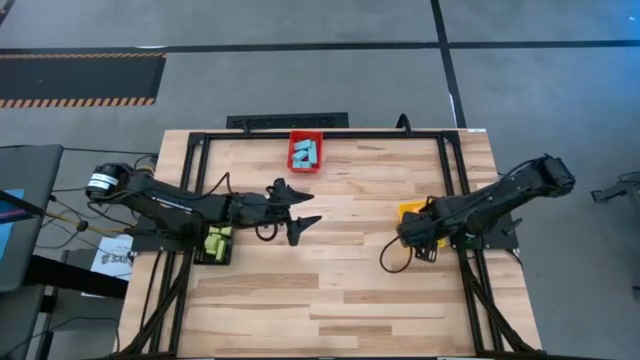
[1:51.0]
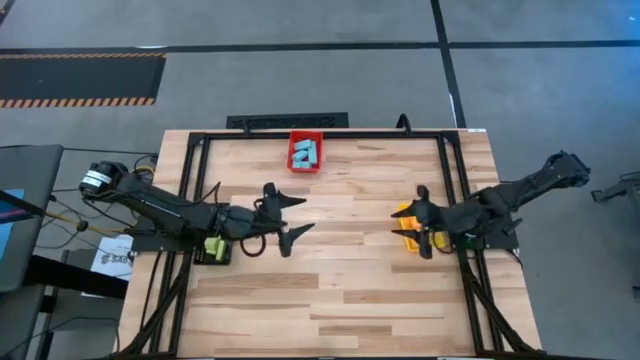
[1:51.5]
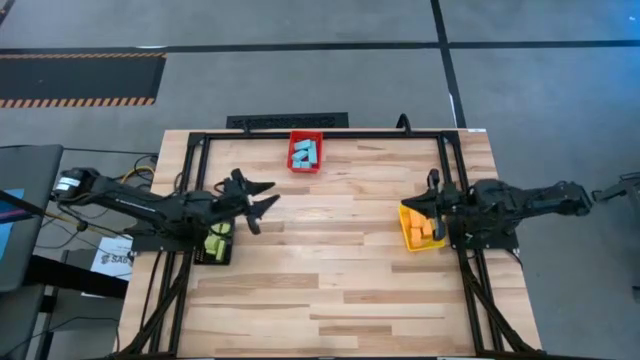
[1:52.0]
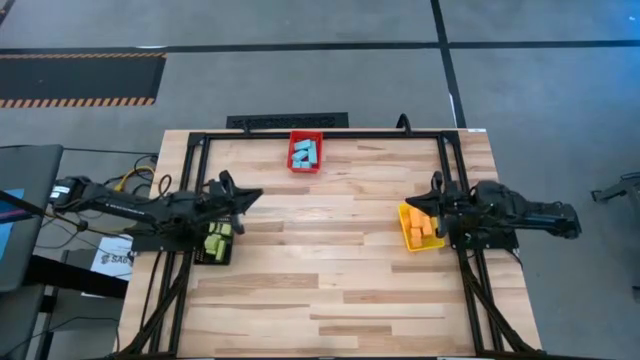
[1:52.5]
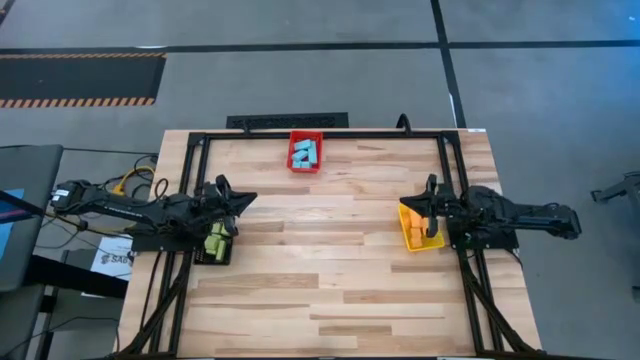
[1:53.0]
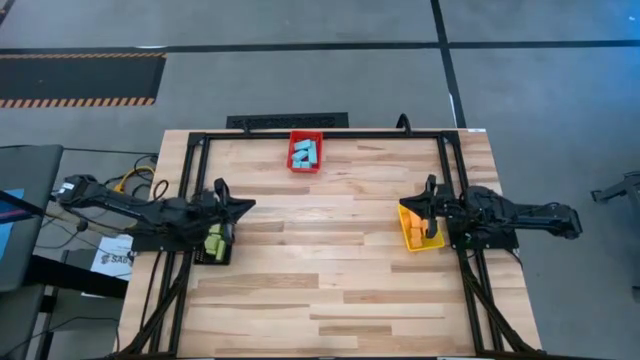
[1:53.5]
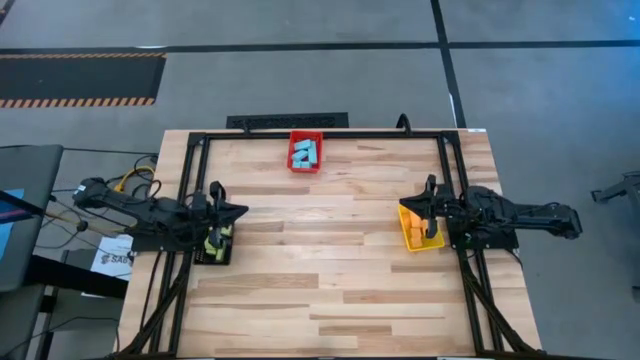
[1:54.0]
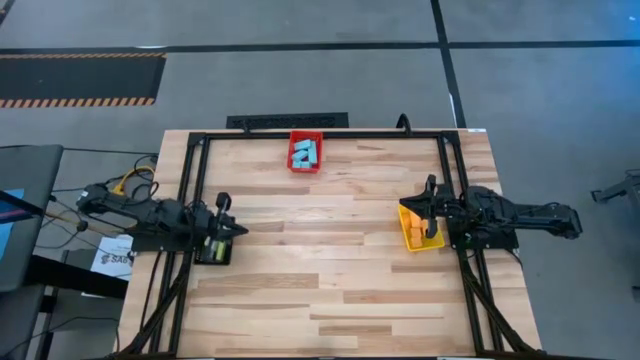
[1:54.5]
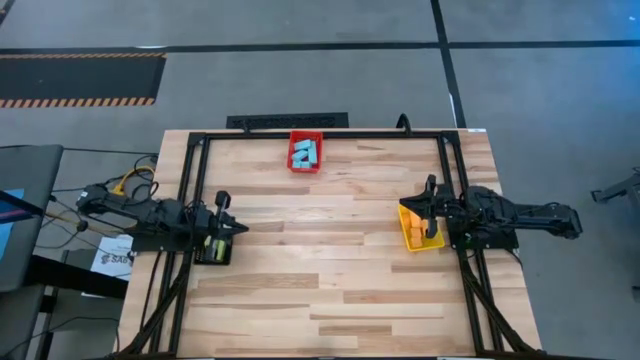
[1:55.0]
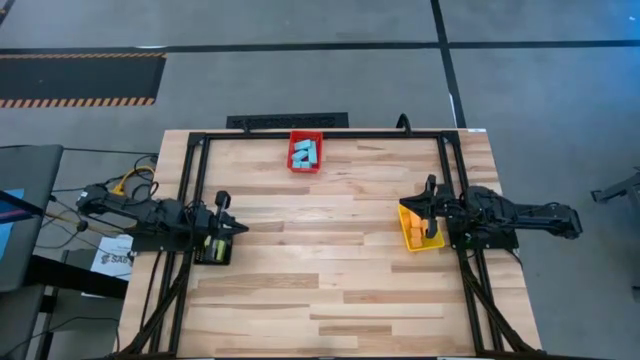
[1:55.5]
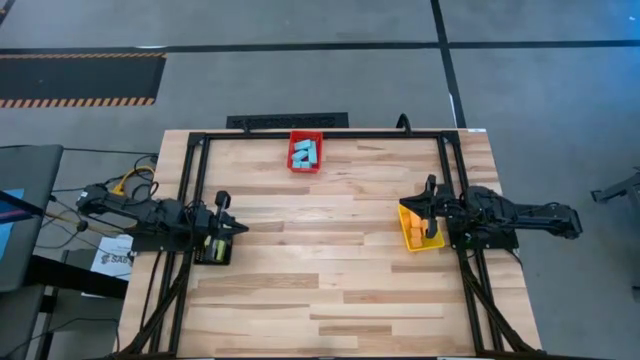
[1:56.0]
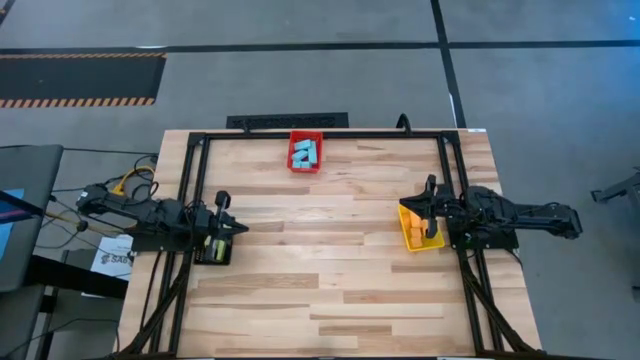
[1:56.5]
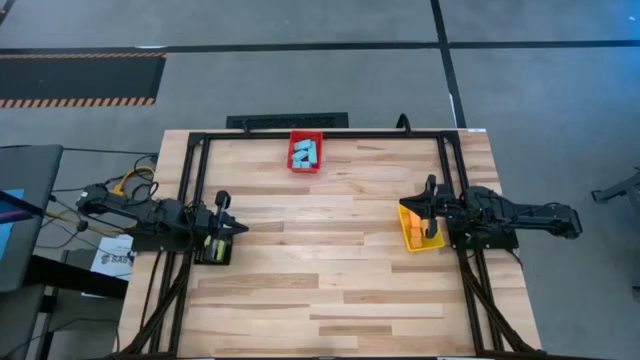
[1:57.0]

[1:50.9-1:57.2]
Task: Sort & place blocks by color
Return to Home Position

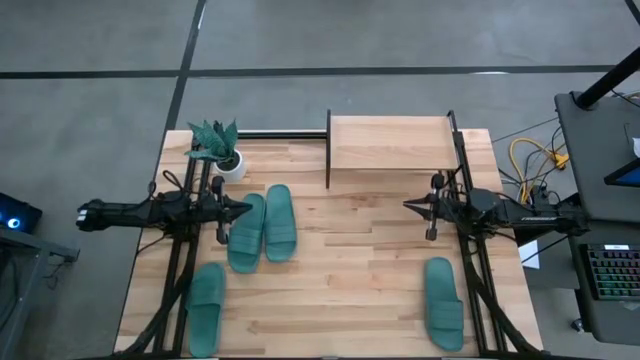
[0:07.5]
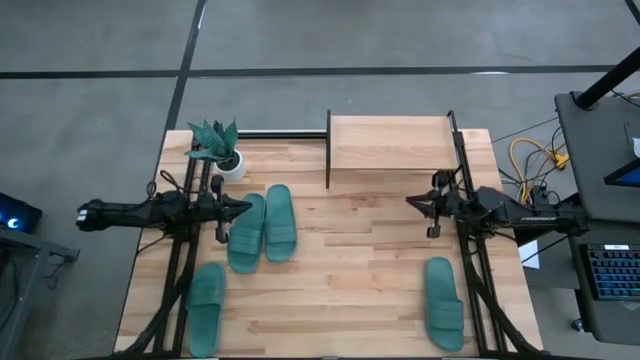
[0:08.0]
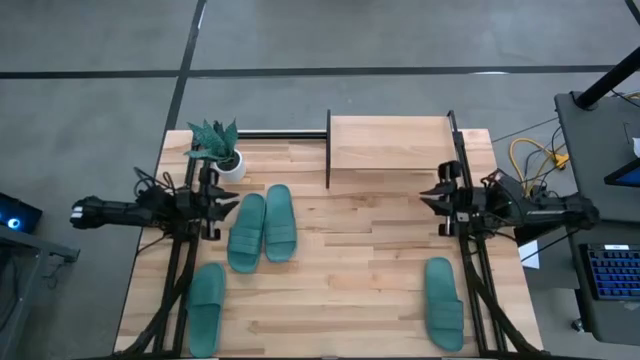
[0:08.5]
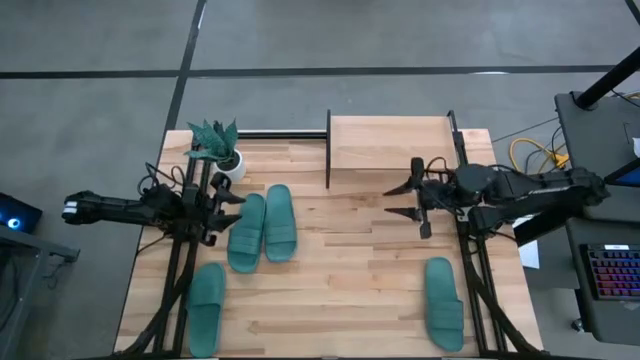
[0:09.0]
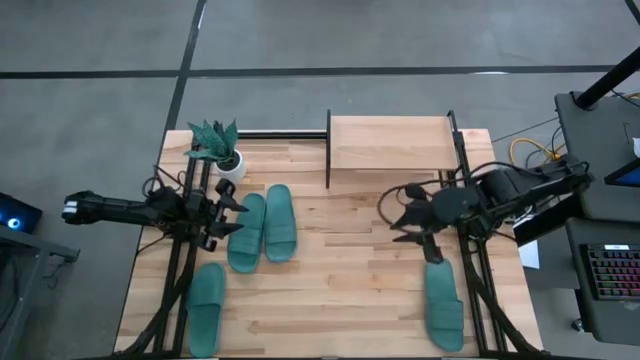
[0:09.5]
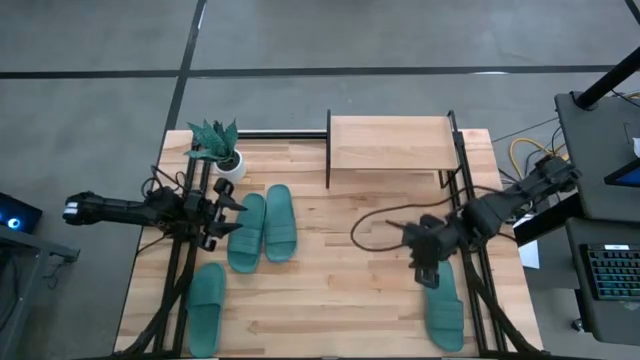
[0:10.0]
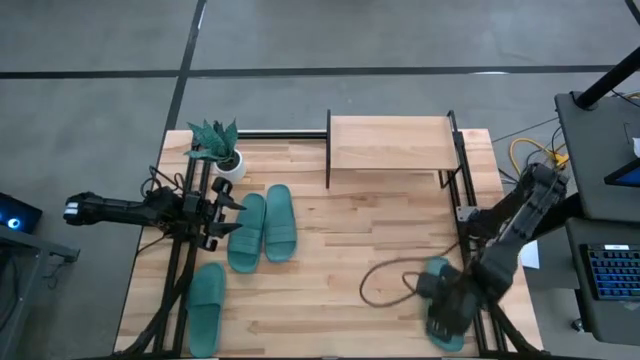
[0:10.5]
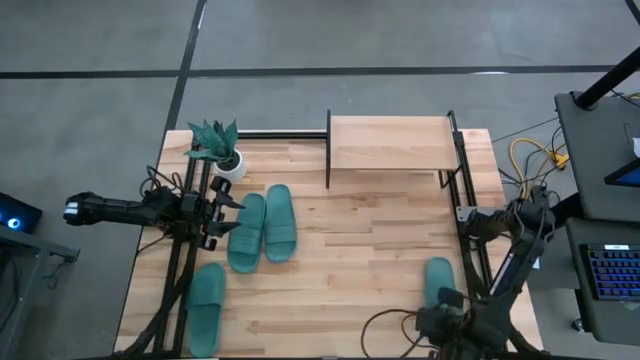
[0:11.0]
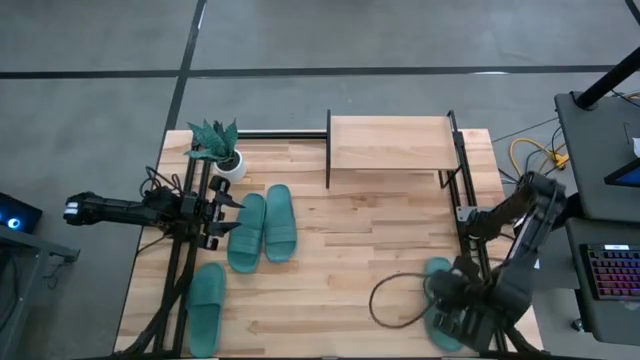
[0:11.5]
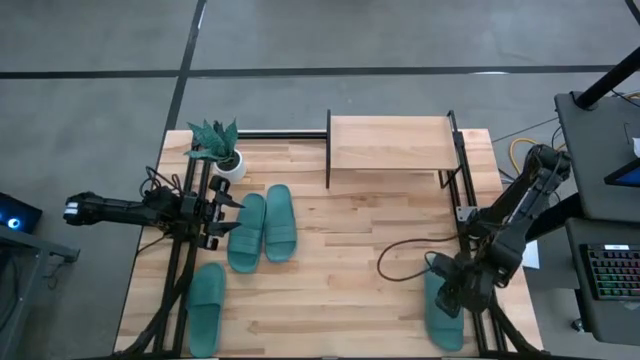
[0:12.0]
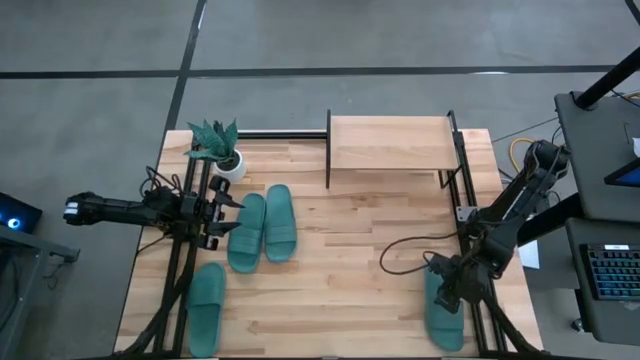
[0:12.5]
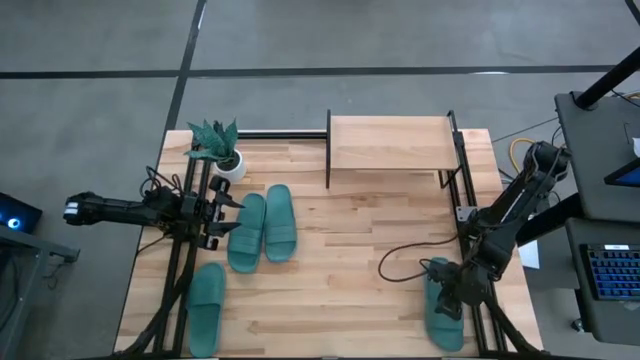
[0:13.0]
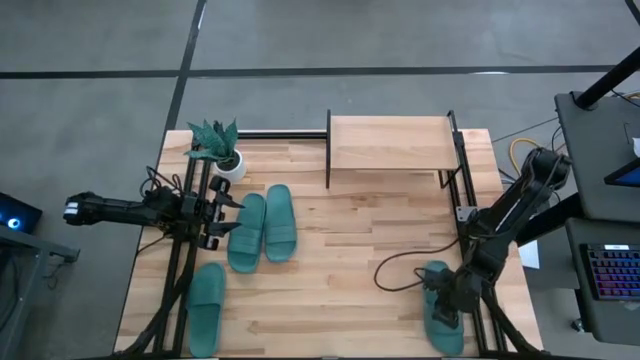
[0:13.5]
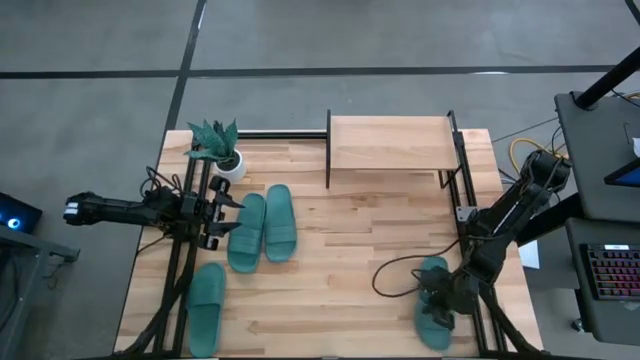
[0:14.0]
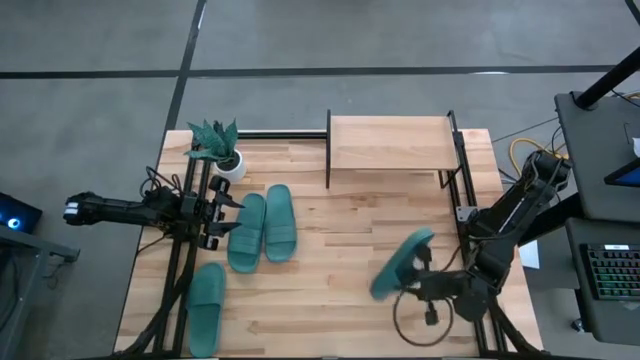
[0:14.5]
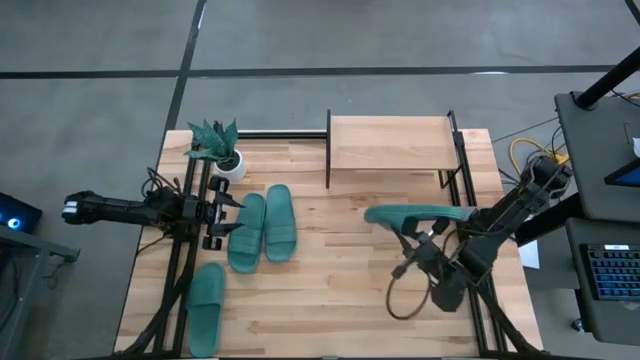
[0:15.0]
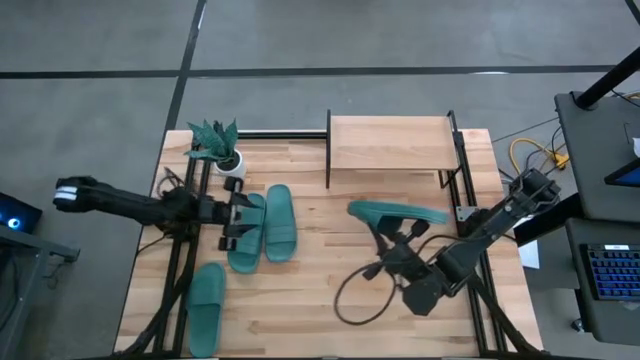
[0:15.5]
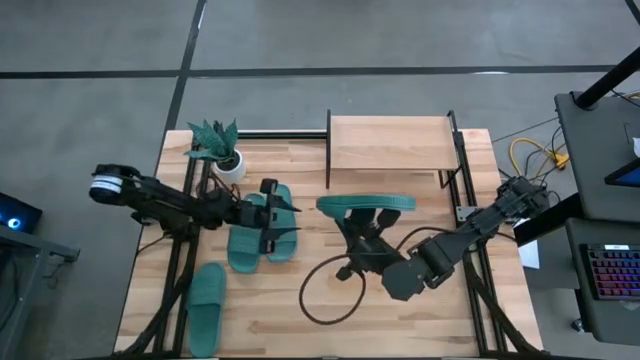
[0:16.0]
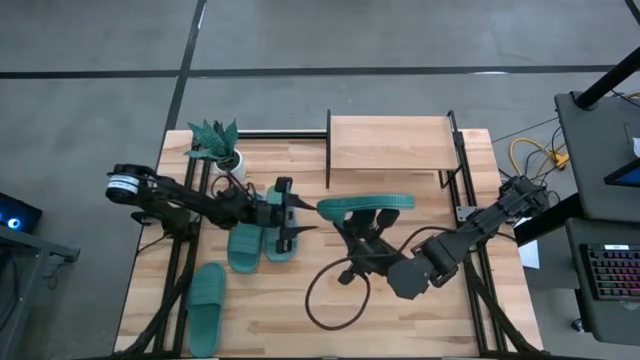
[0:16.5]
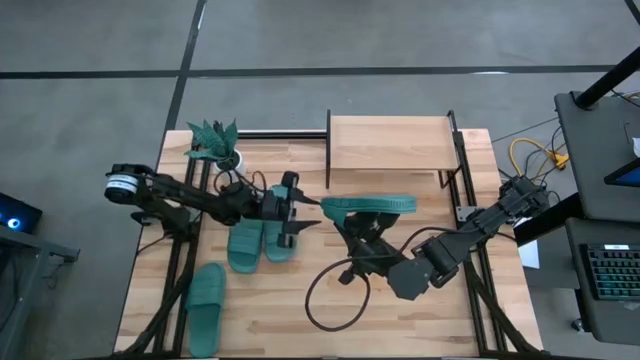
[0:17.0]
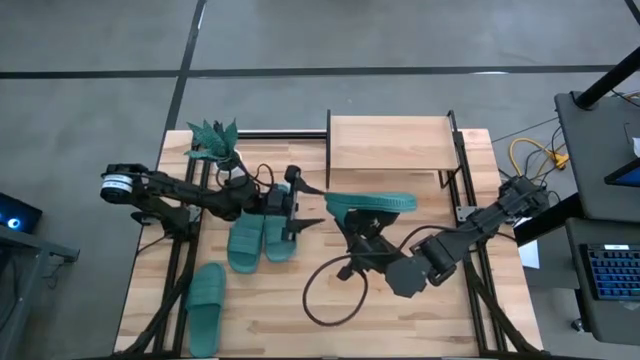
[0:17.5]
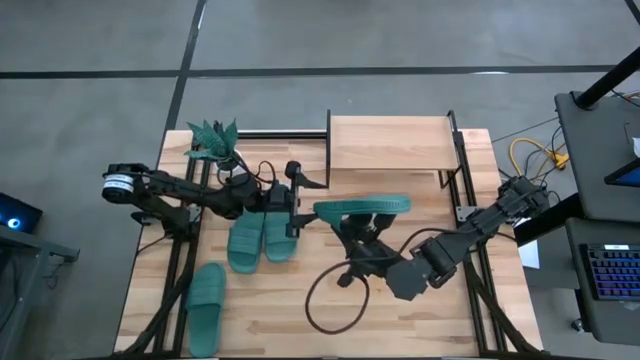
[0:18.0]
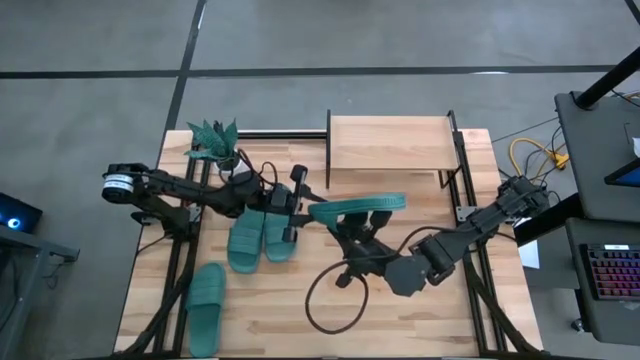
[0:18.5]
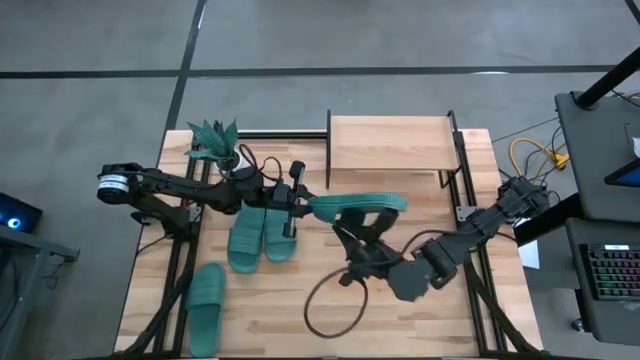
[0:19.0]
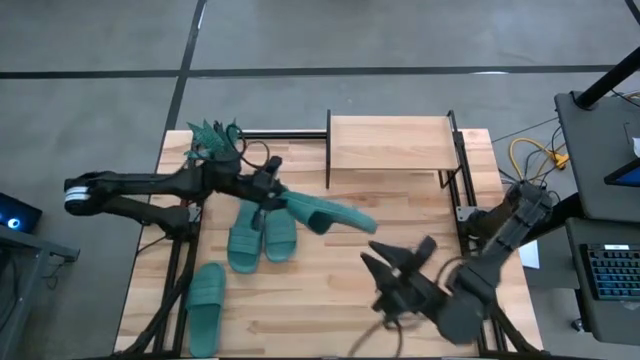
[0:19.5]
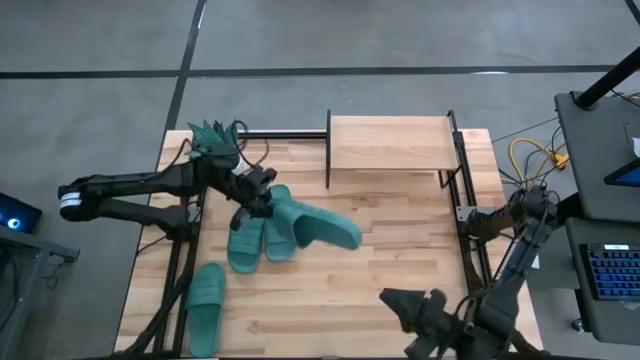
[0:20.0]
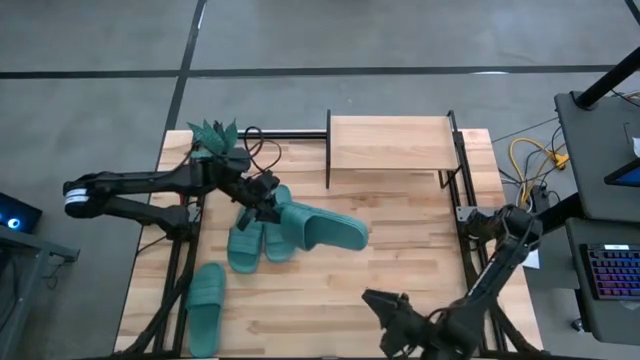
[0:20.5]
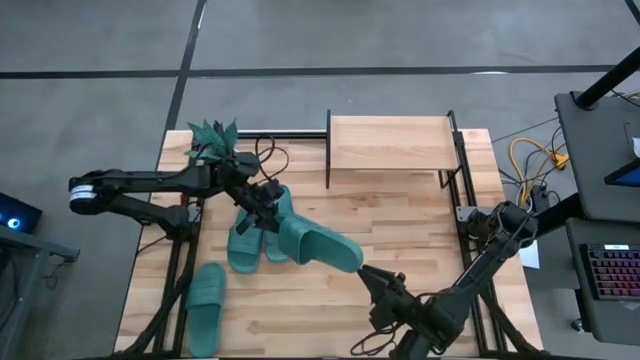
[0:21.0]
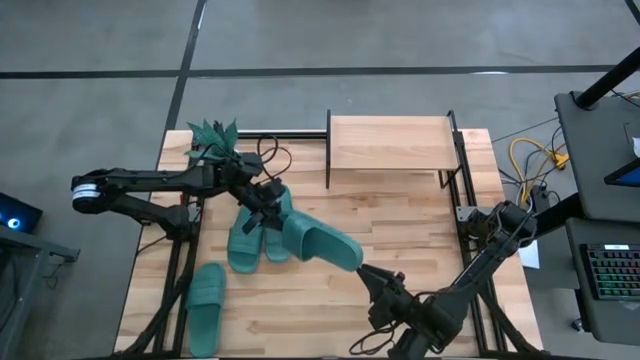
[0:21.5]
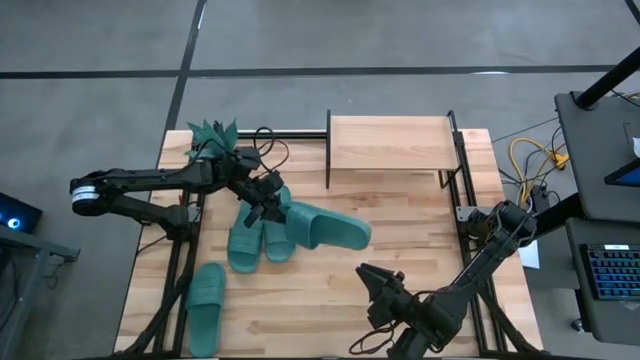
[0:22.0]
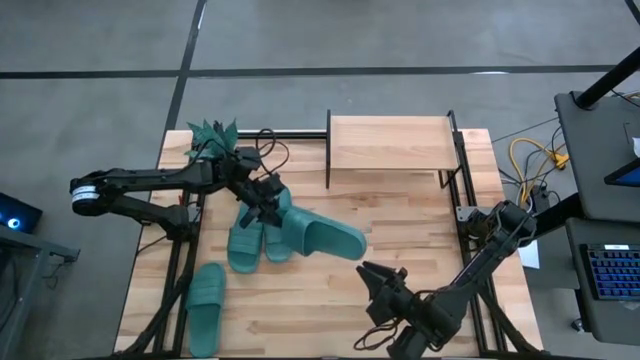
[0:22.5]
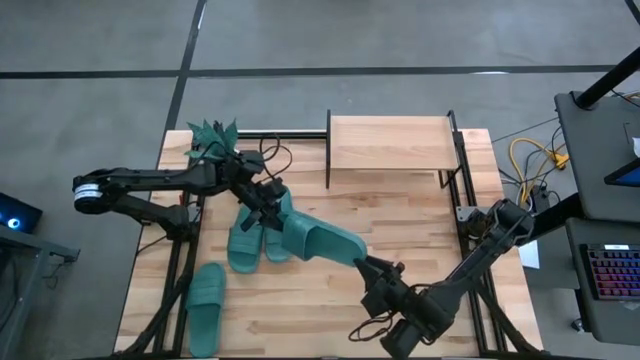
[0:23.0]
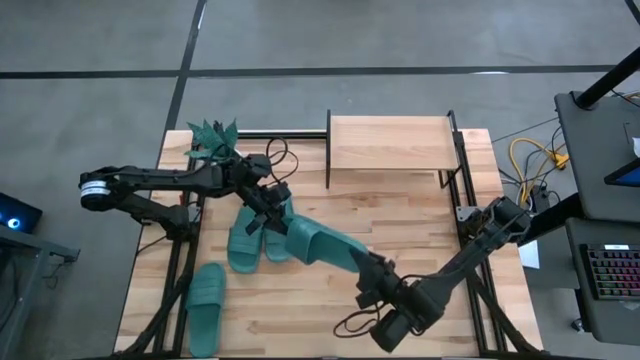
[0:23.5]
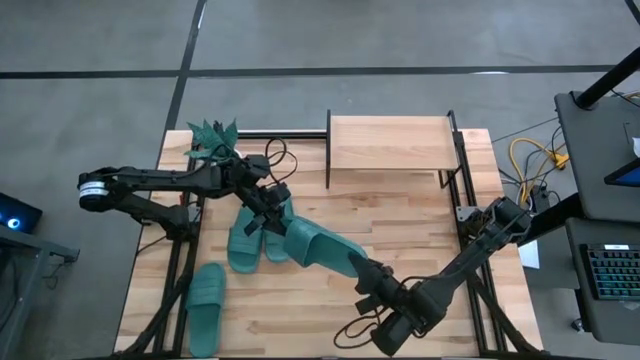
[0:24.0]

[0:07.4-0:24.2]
Task: Pick and place slides into the shelf
Put the bottom right green slipper on the shelf
